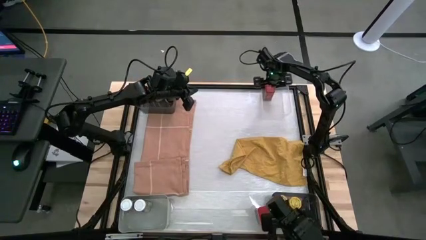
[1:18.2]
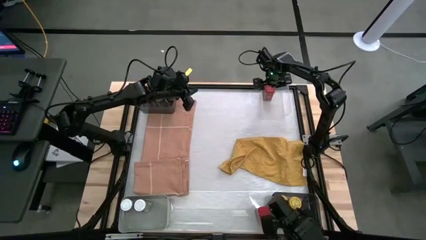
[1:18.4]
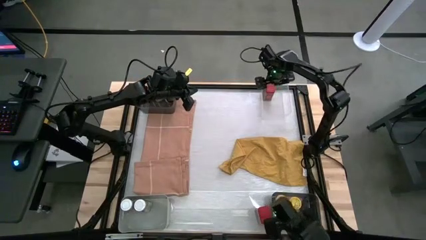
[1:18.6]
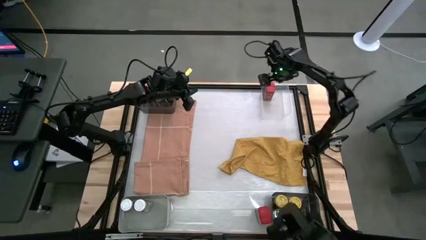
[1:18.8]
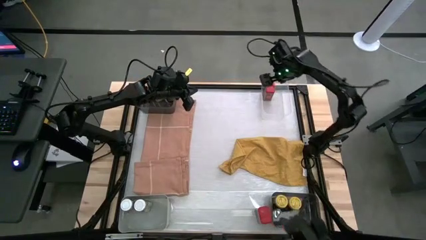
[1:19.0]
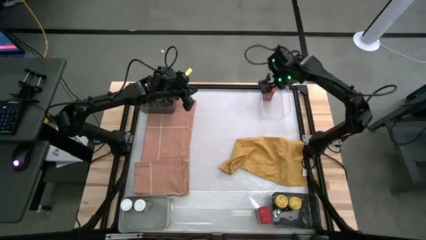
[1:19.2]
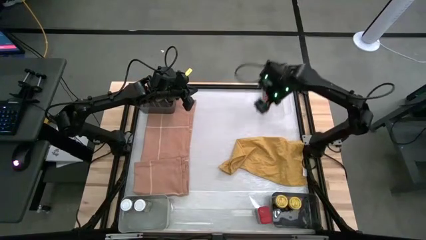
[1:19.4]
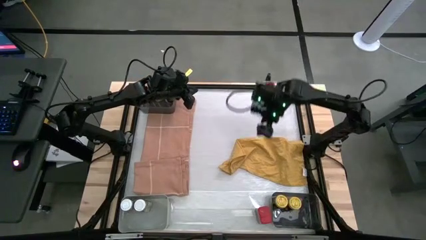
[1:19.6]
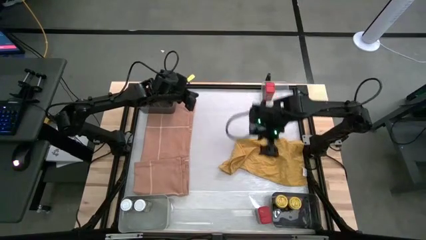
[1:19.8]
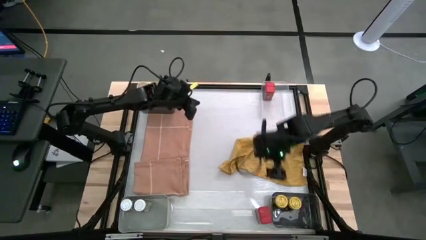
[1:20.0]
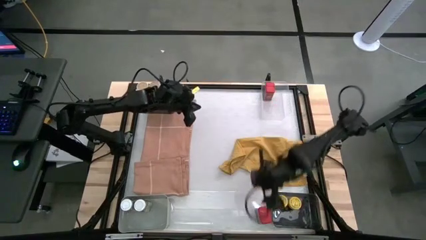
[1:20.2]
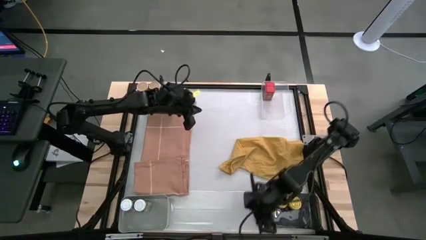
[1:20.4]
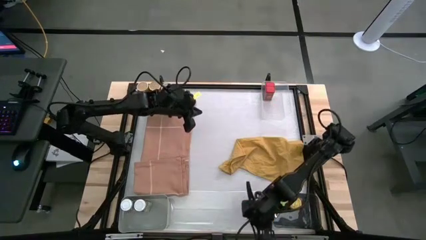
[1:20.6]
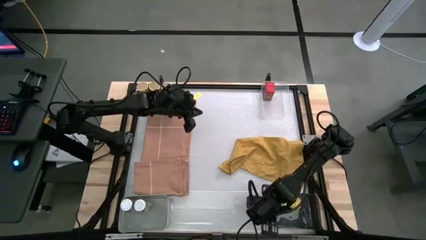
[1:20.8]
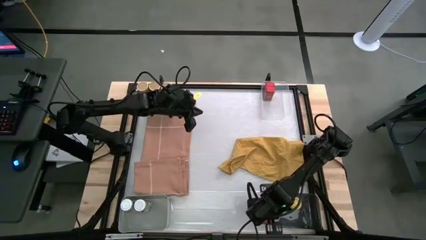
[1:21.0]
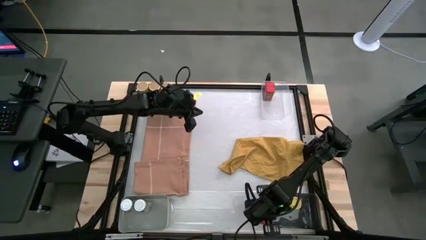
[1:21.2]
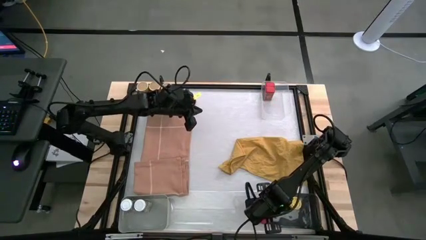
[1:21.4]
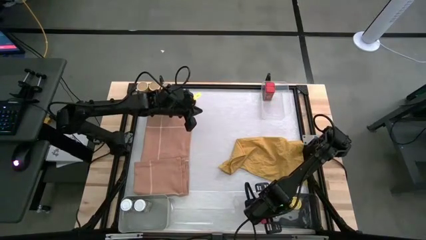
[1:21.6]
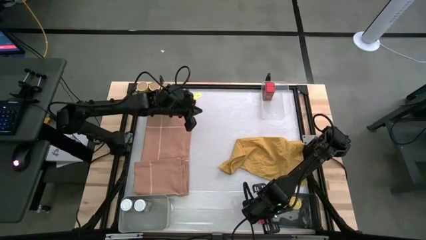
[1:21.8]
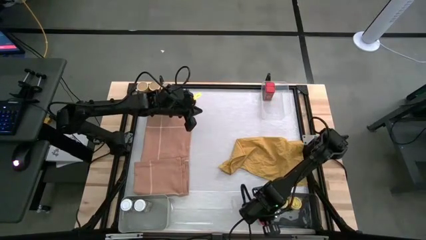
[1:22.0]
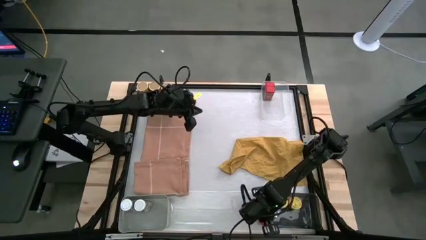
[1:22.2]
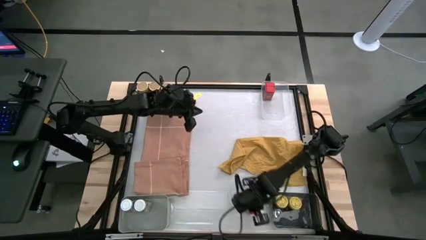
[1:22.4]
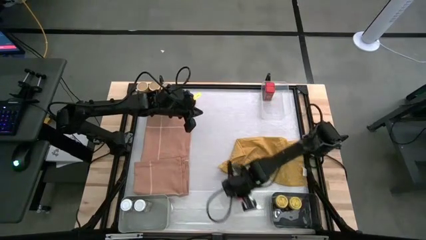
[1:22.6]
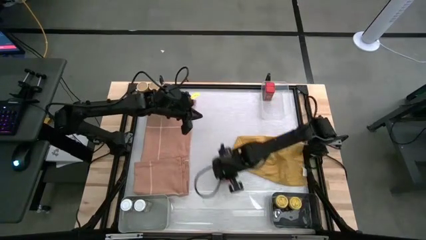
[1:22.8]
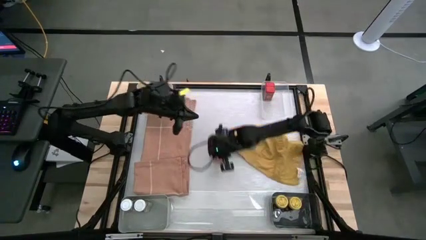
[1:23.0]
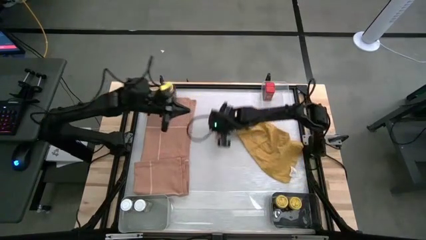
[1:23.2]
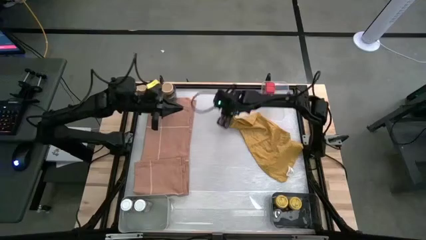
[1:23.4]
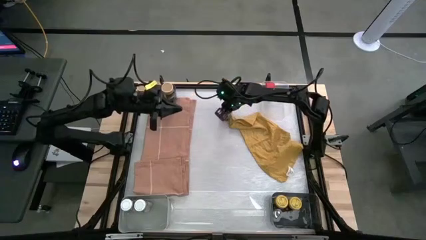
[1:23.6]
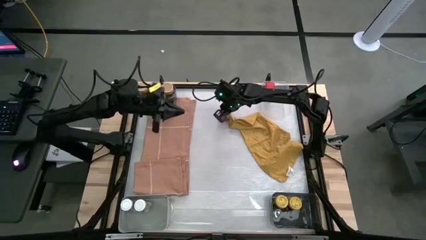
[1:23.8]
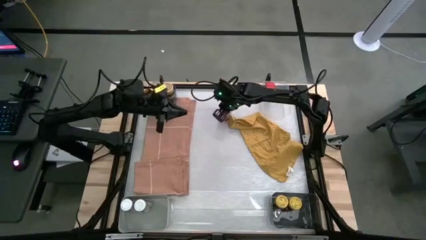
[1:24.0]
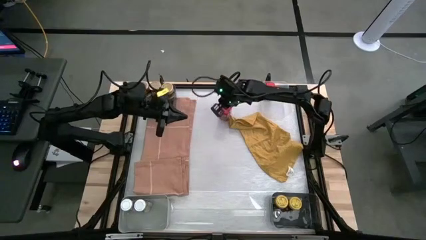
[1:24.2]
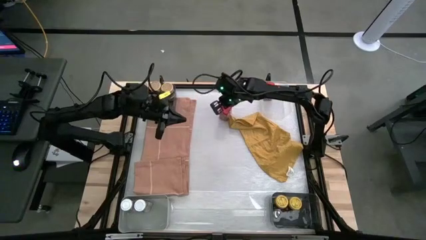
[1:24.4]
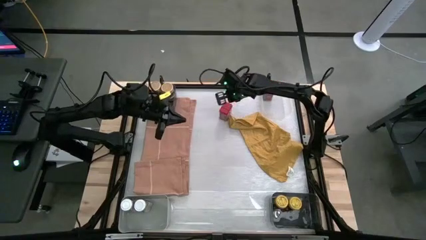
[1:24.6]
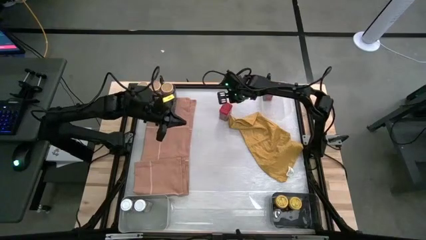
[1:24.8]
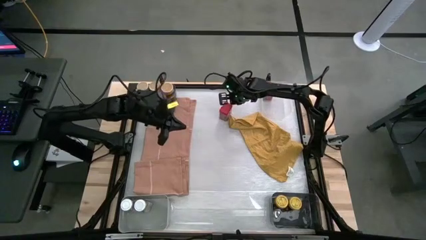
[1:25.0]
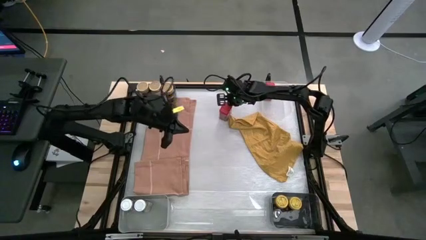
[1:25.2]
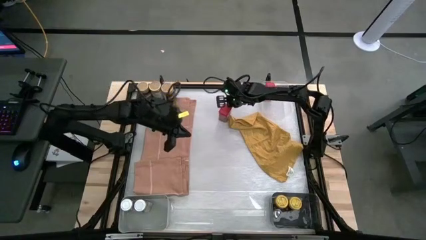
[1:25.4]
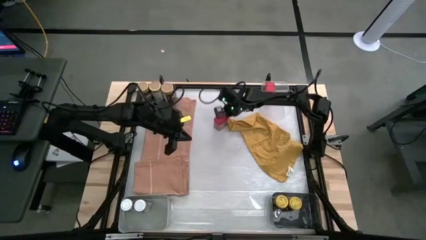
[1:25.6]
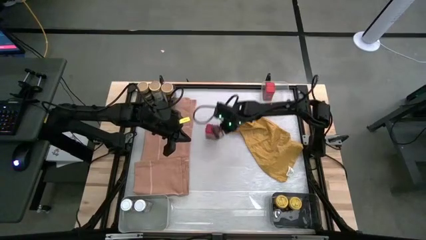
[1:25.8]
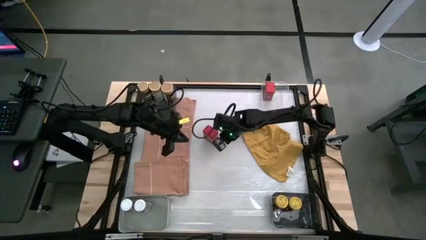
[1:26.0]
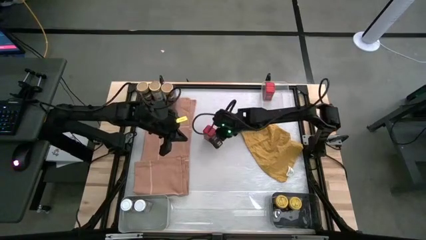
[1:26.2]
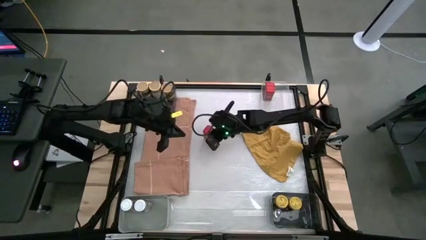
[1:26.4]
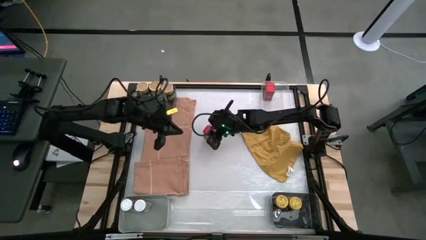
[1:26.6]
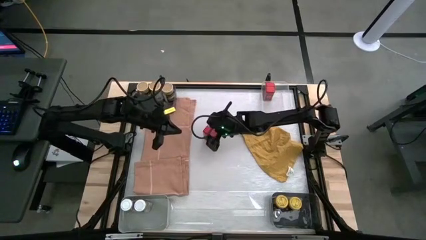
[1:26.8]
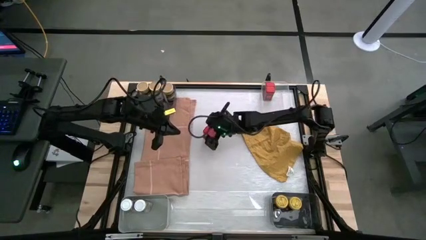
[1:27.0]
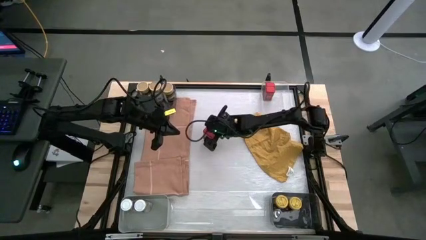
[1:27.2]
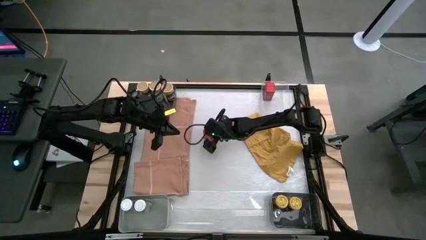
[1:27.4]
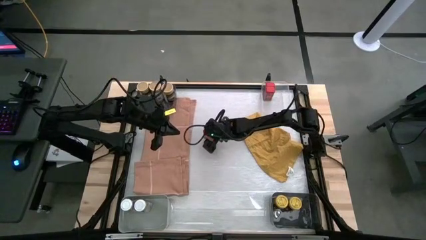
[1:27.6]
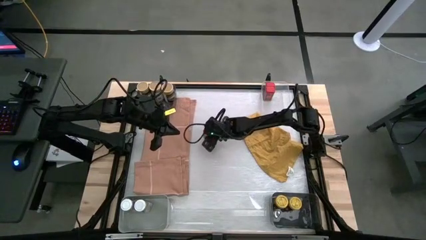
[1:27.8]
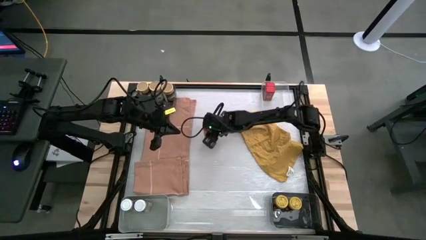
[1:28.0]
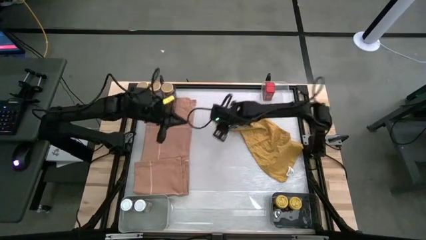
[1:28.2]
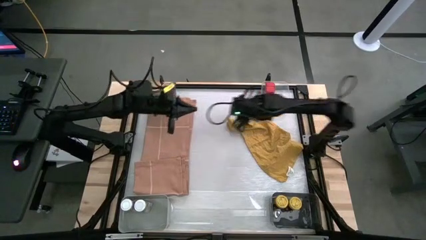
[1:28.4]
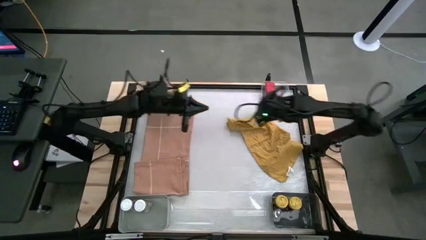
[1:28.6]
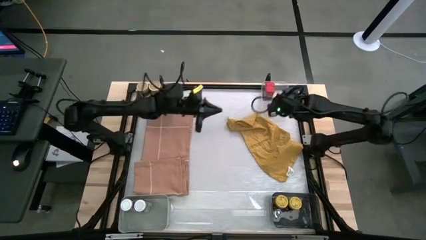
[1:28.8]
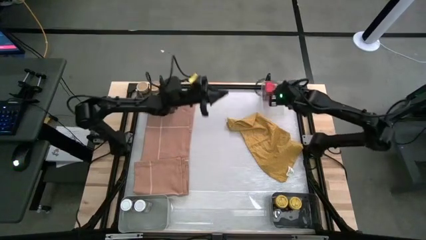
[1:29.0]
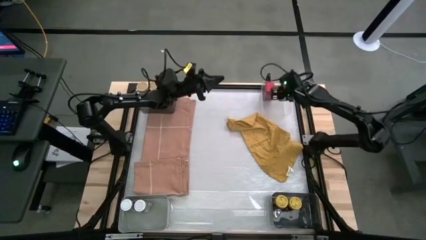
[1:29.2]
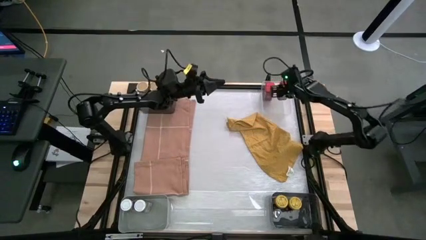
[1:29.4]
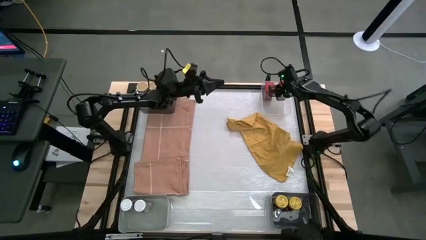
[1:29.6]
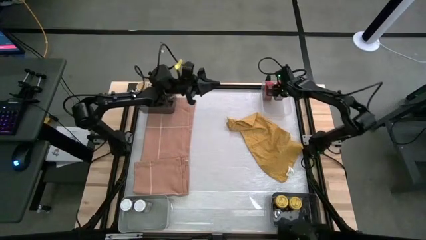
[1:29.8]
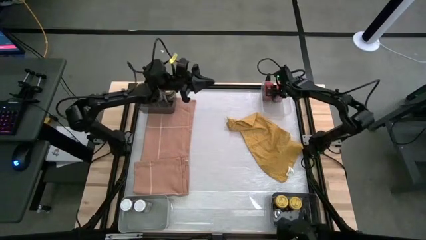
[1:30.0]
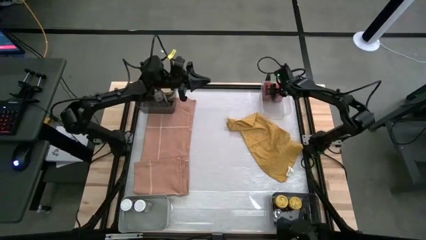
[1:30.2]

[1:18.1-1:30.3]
Task: Sort spices by type
Put the red seasoning can into the transparent bin

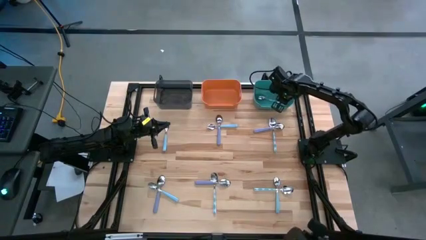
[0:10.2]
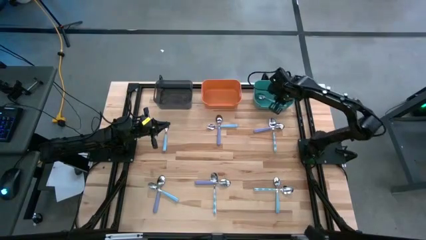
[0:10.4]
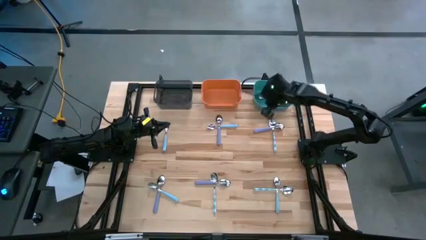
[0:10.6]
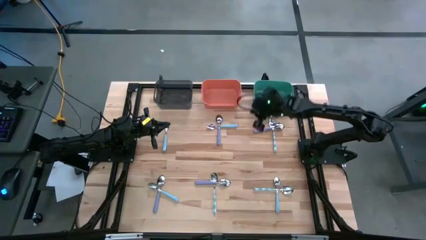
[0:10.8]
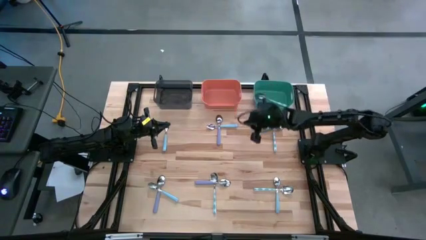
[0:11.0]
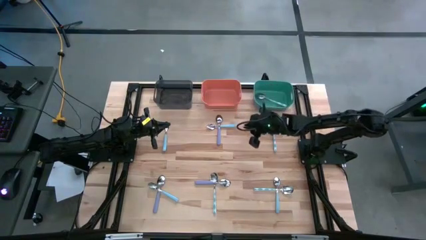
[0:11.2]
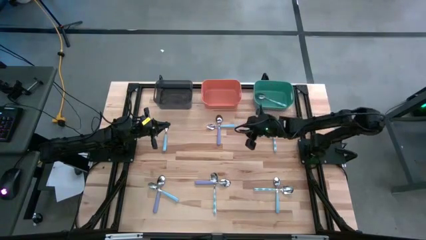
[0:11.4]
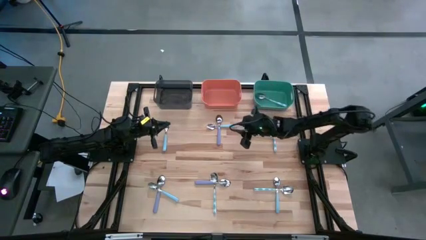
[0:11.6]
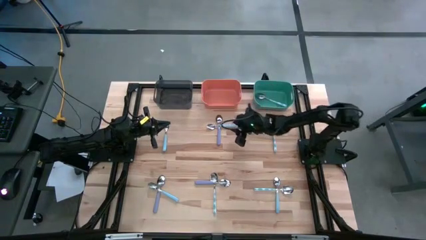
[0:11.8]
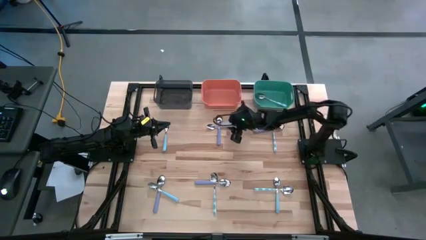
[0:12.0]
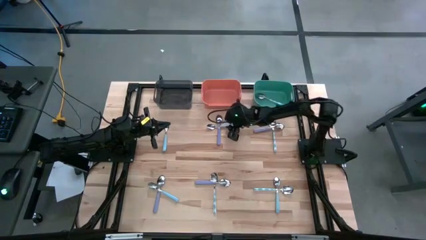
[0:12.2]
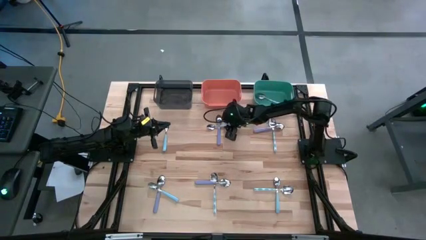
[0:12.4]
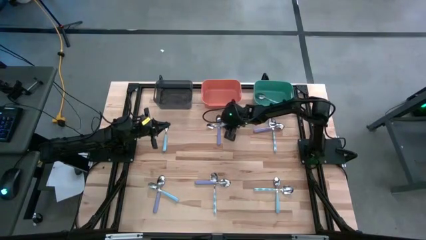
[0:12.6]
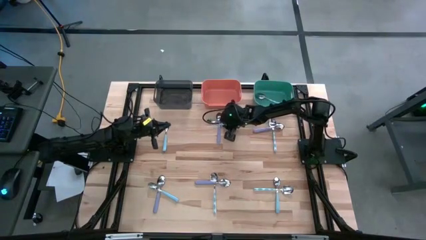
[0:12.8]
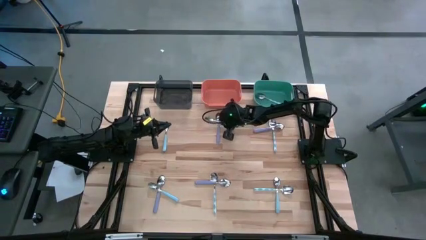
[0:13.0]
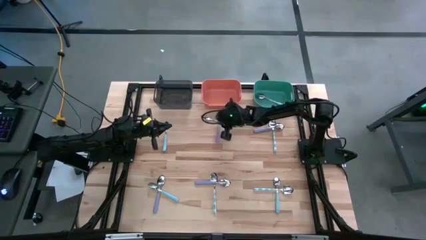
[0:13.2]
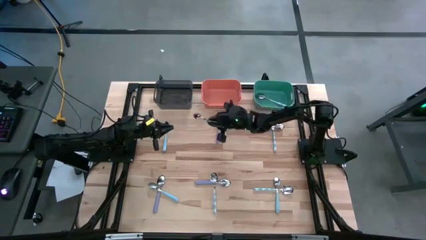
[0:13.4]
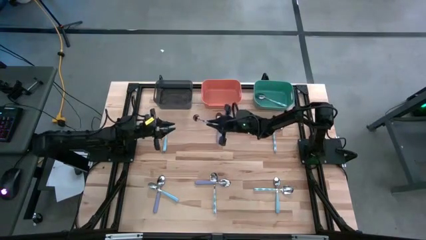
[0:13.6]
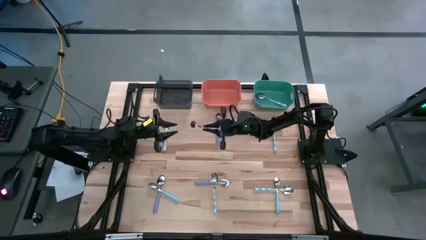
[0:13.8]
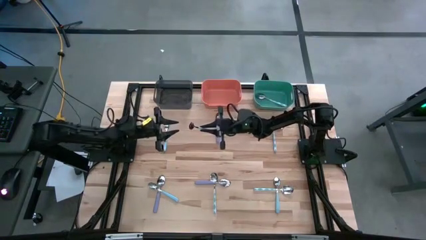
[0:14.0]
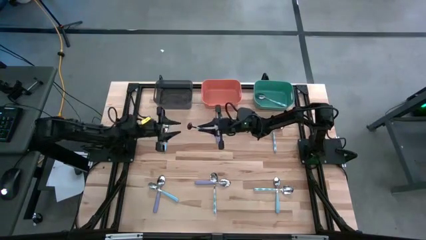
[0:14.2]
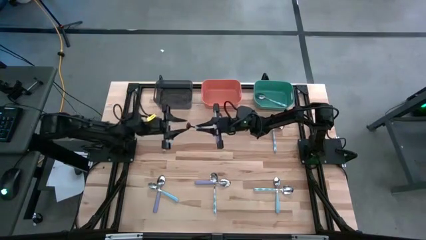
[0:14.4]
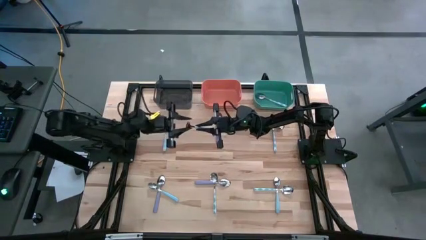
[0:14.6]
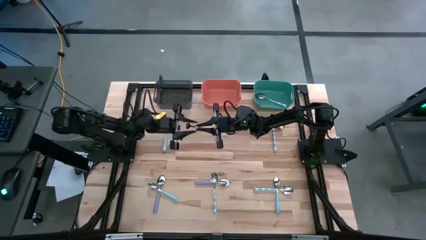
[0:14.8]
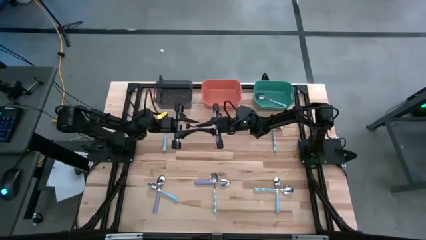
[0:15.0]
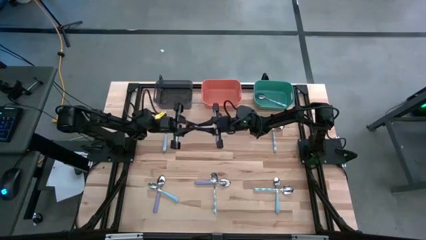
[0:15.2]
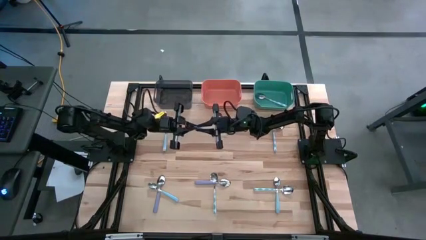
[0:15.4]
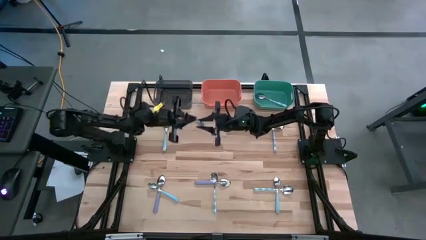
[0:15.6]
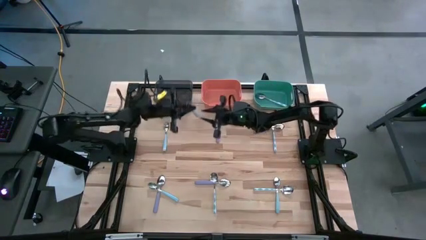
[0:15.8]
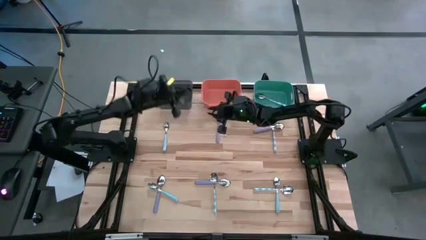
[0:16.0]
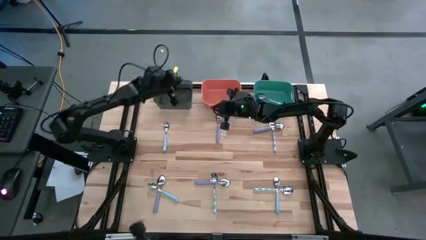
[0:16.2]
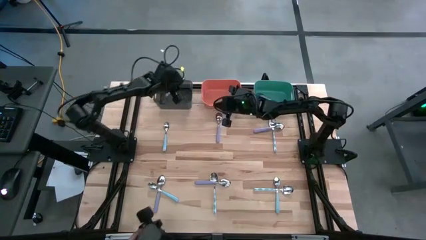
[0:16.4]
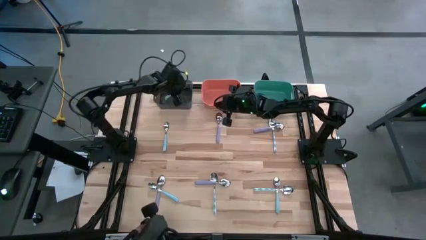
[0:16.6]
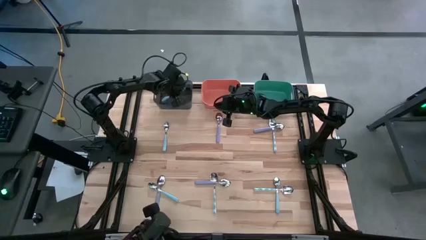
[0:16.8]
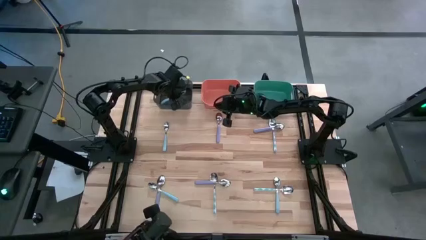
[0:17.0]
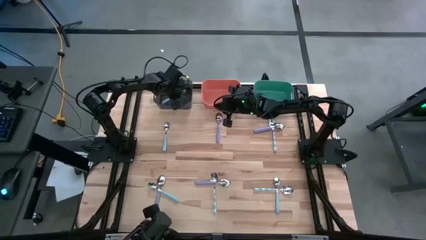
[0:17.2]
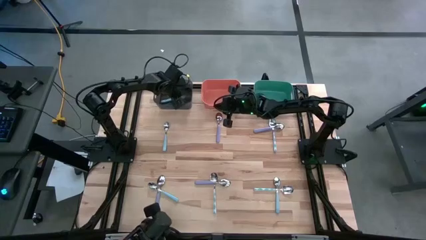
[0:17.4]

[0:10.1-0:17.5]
Task: Sort silverware by color (type)
Put the light blue spoon into the black bin
